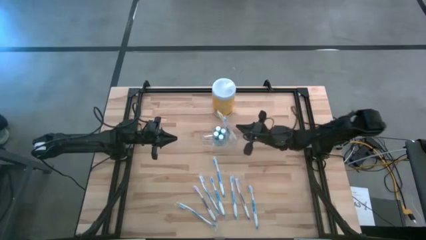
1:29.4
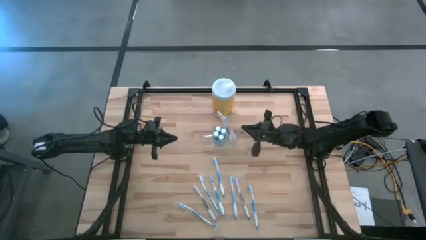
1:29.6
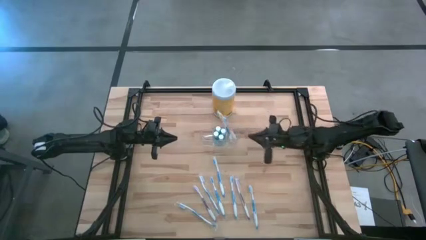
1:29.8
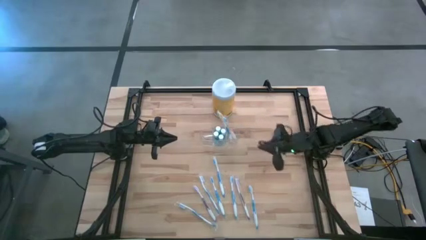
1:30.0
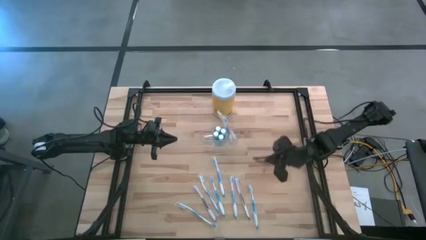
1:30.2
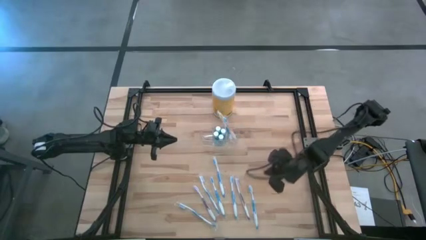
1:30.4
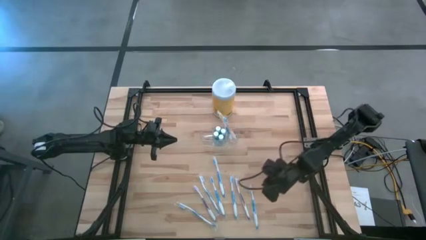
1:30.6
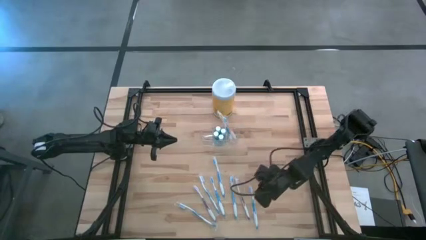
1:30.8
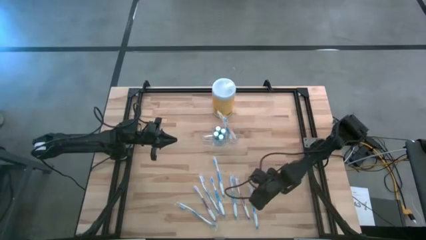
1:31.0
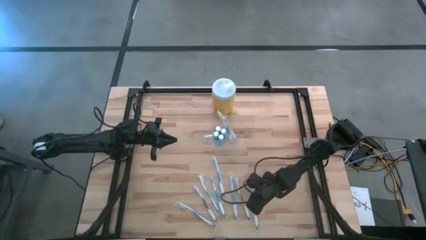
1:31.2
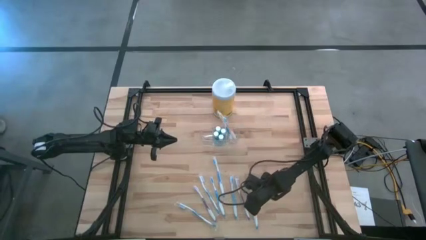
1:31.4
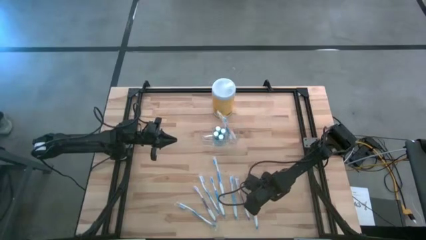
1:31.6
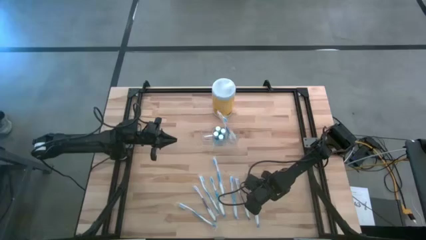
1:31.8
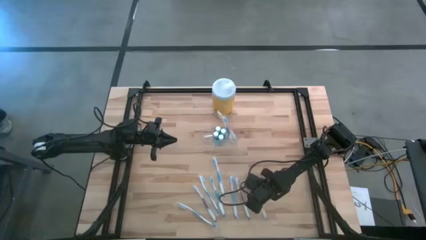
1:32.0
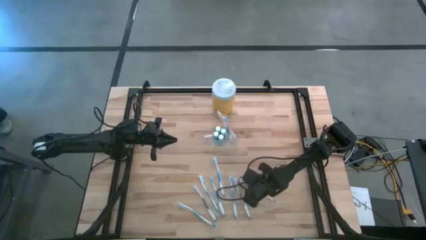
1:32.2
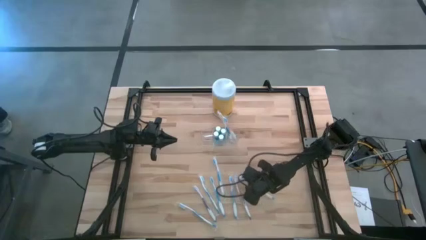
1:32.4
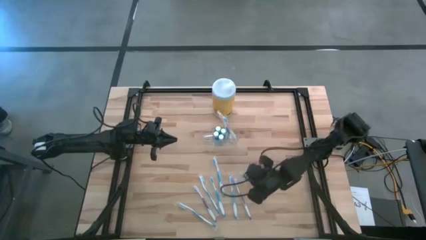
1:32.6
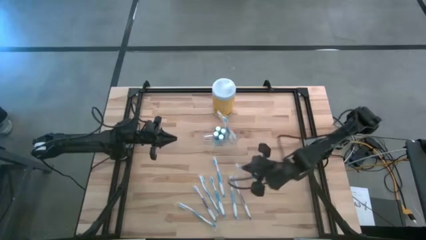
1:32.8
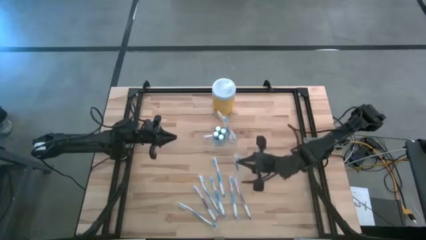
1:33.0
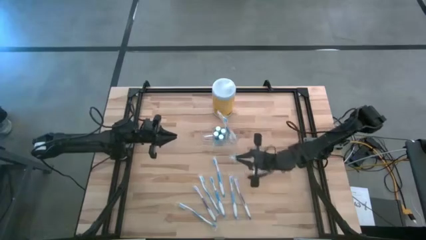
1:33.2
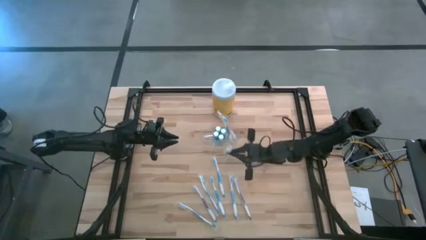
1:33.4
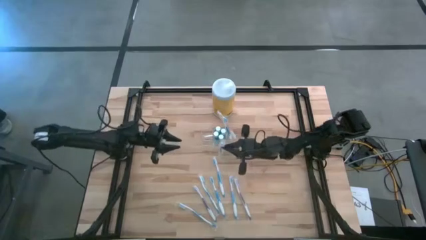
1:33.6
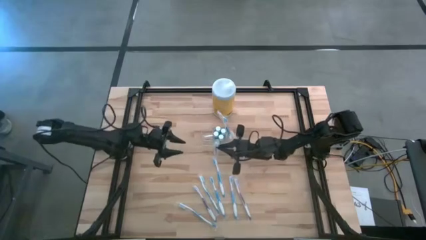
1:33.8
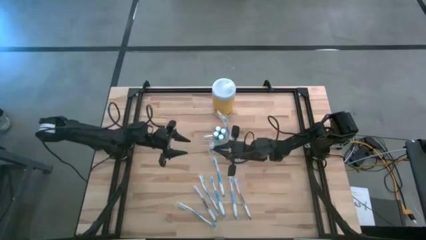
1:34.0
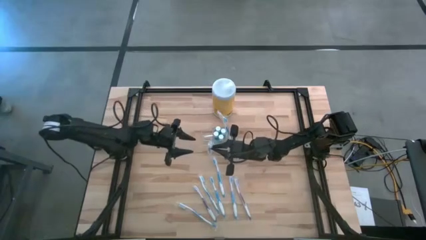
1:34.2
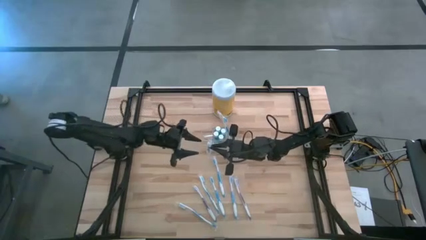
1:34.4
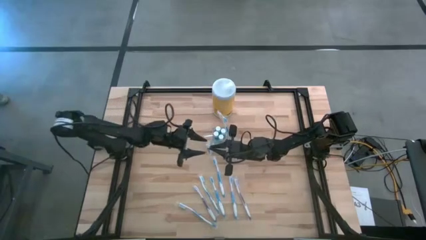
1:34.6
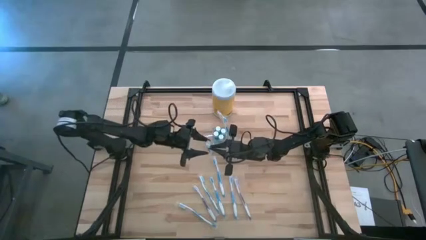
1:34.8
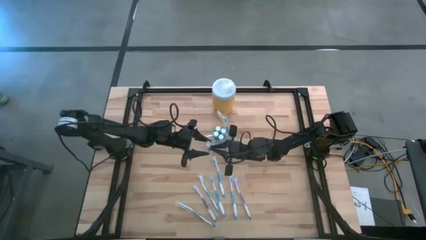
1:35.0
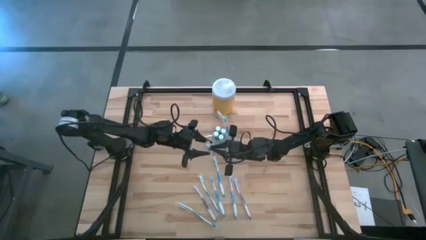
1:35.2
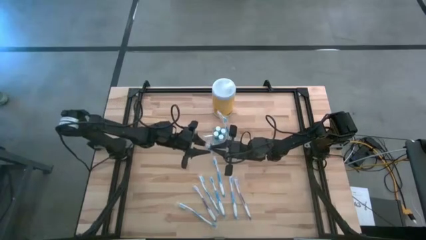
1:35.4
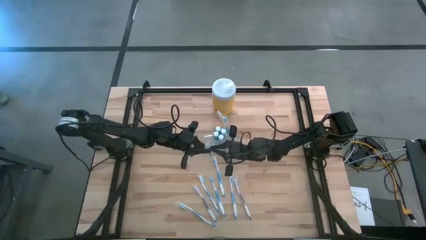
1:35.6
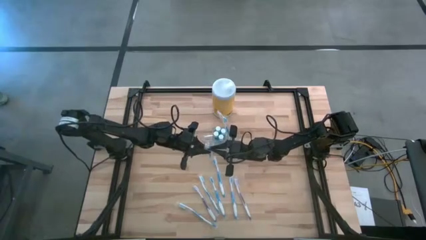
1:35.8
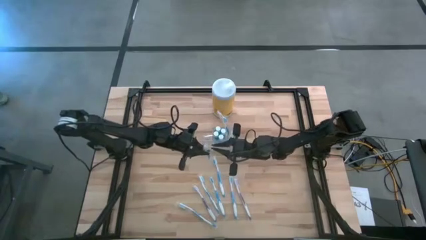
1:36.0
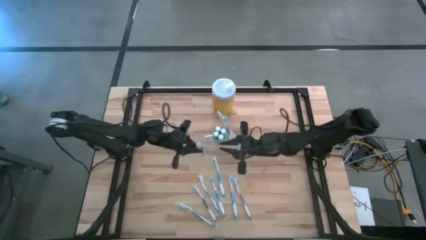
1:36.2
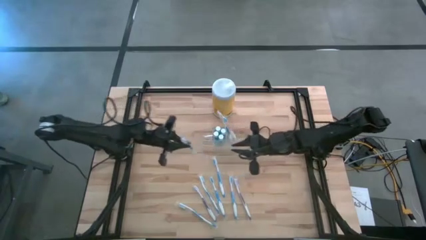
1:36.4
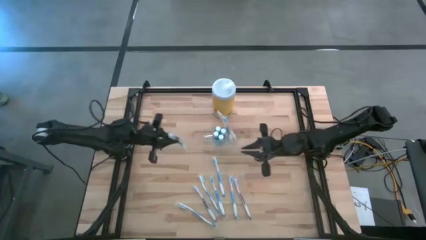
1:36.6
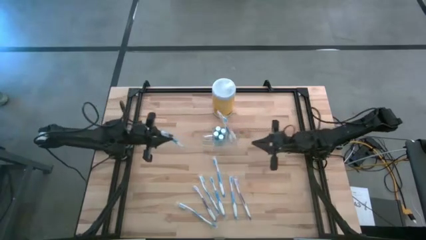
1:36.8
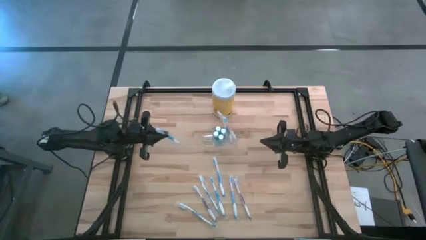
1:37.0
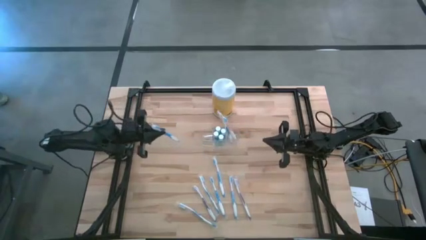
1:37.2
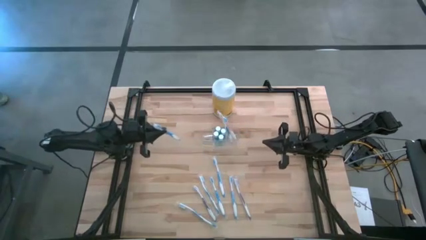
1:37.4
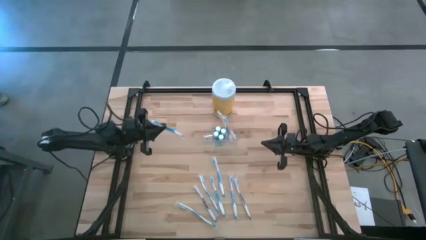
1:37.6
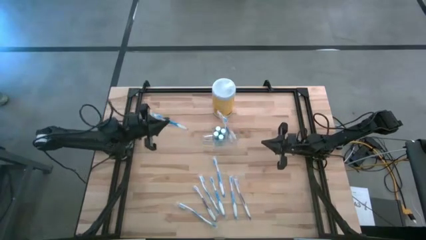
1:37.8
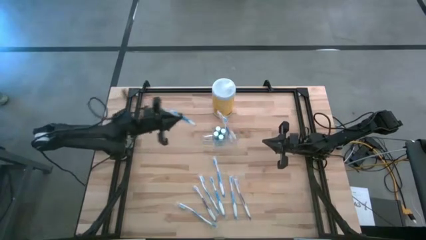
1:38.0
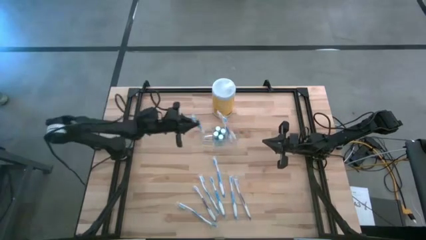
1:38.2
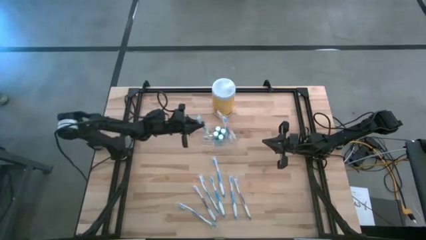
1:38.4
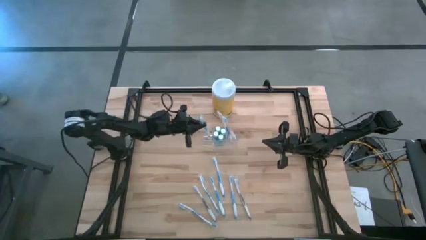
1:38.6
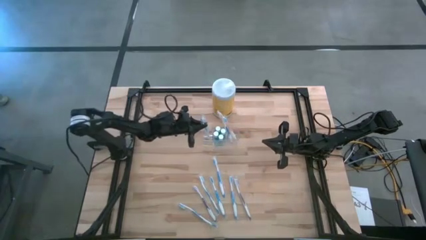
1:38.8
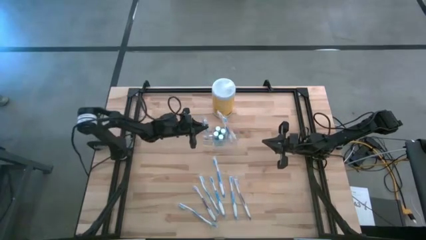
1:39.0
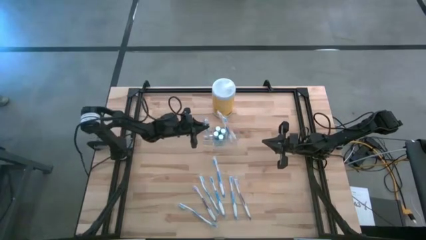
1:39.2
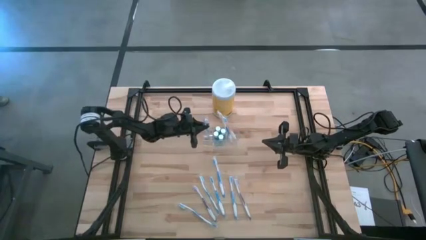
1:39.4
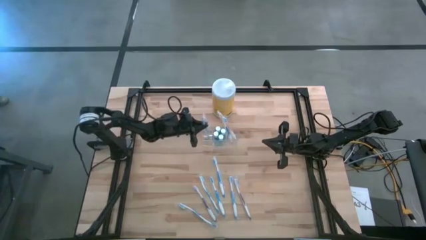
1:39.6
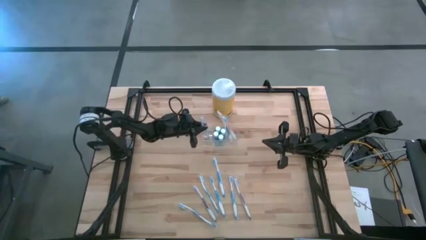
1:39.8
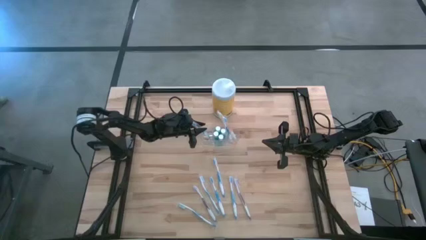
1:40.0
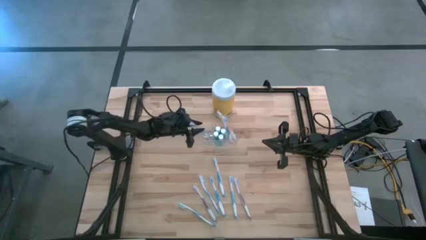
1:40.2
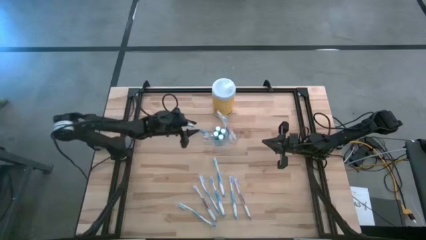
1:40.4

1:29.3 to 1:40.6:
Task: Pick & Place toothbrushing station
Put the blue toothbrush into the transparent organizer

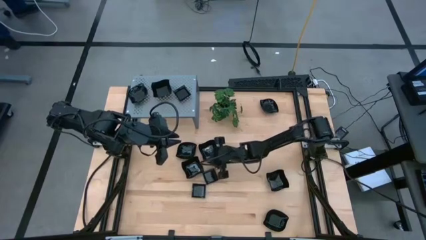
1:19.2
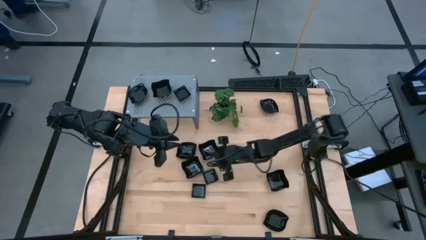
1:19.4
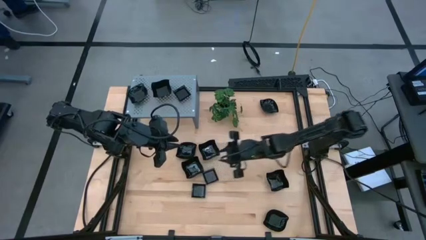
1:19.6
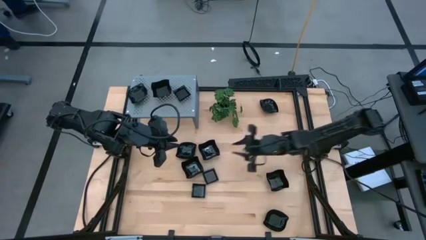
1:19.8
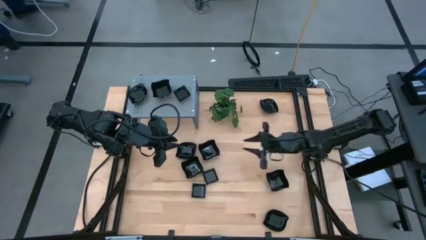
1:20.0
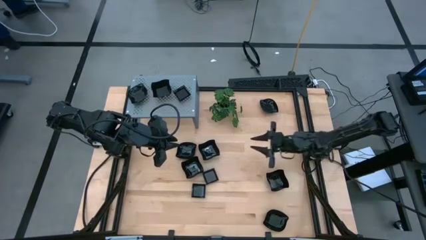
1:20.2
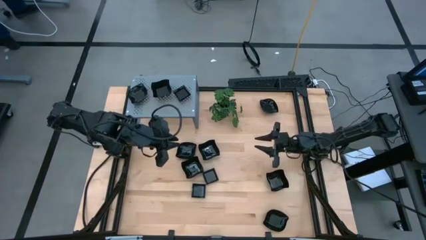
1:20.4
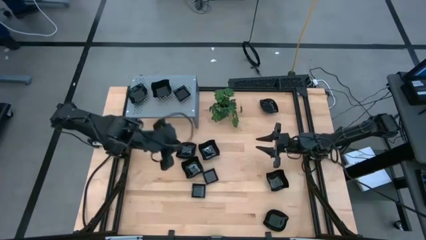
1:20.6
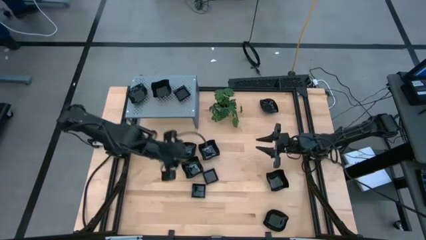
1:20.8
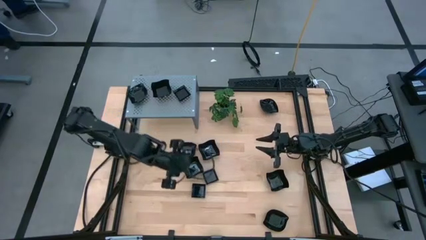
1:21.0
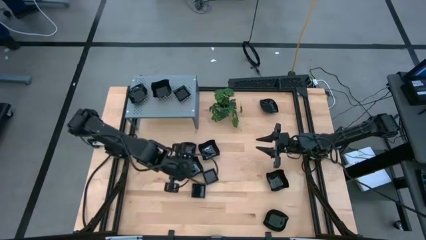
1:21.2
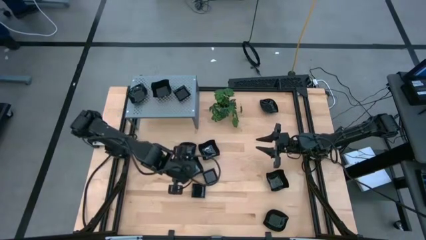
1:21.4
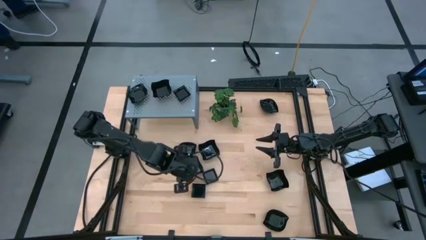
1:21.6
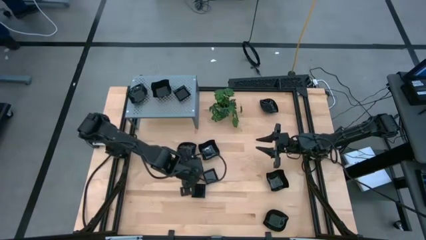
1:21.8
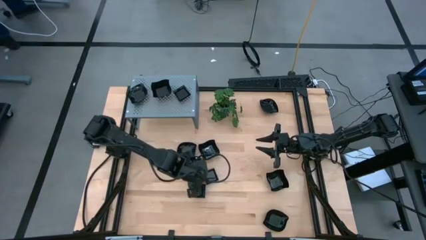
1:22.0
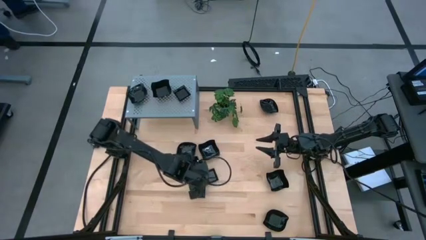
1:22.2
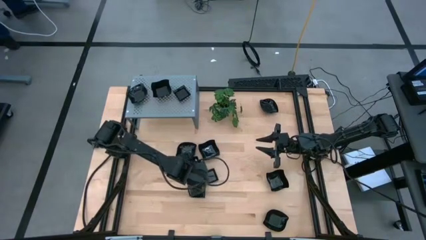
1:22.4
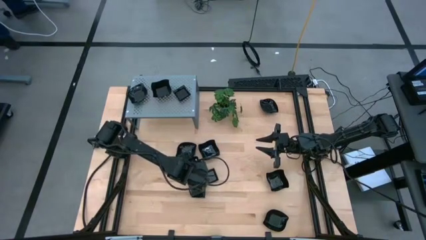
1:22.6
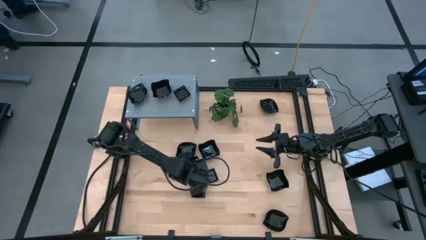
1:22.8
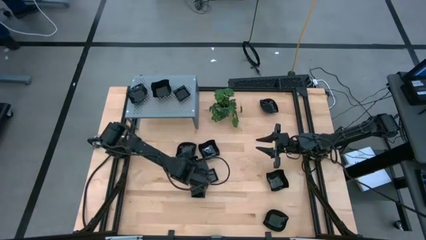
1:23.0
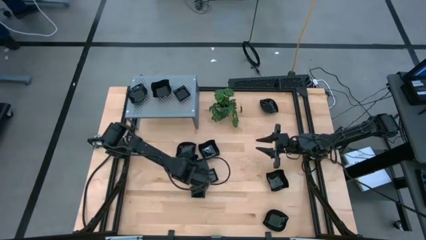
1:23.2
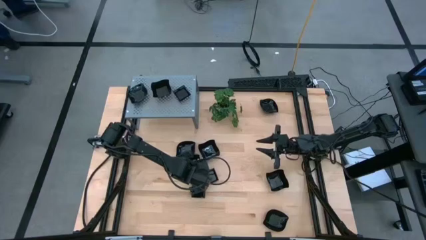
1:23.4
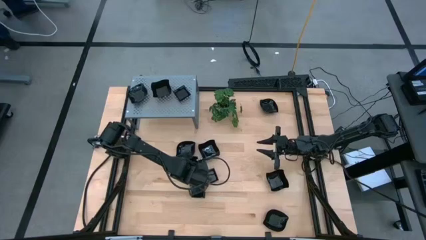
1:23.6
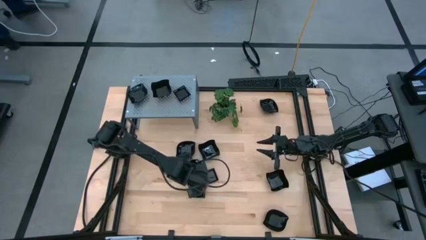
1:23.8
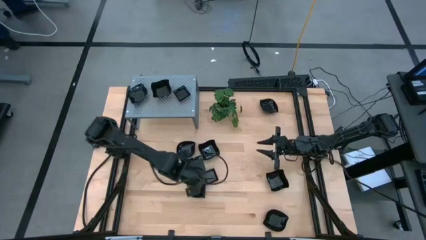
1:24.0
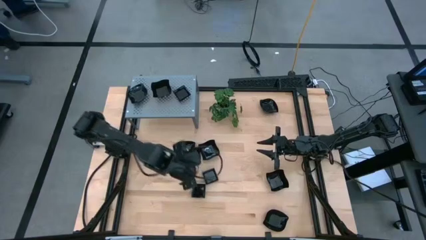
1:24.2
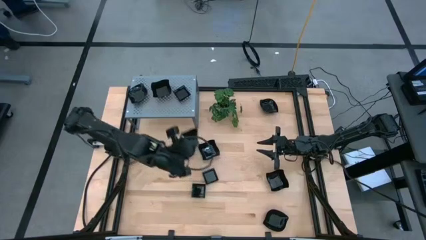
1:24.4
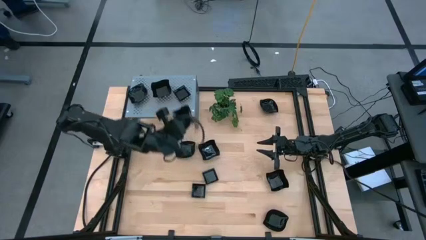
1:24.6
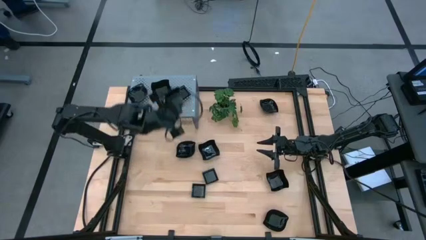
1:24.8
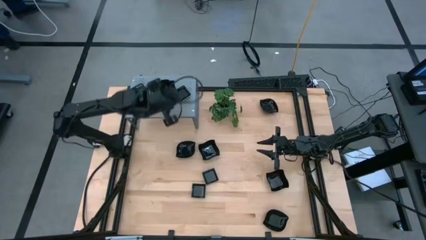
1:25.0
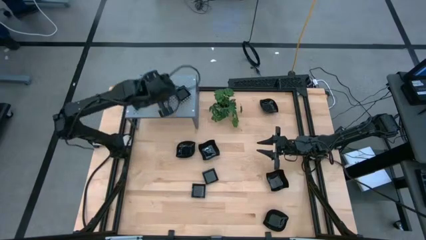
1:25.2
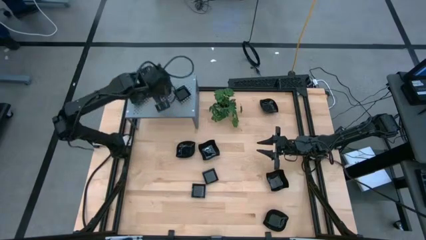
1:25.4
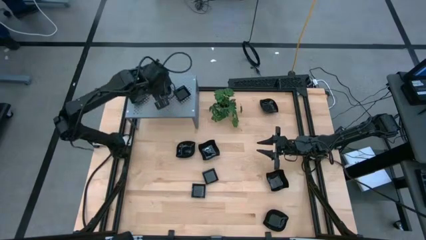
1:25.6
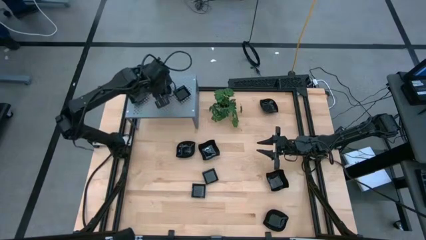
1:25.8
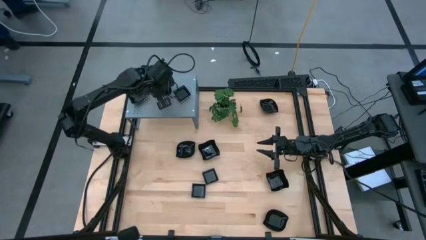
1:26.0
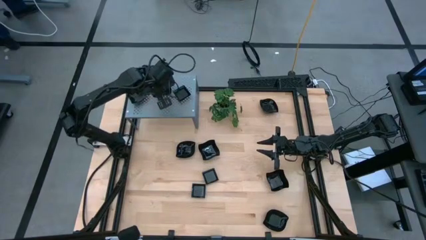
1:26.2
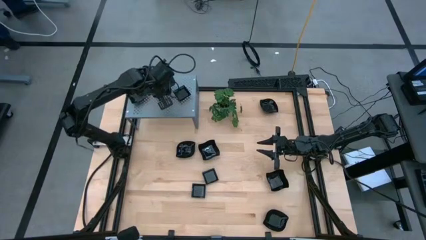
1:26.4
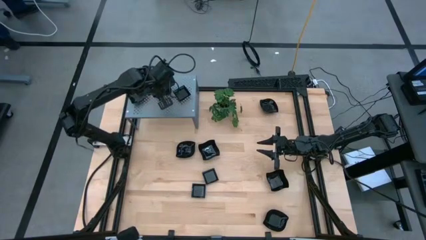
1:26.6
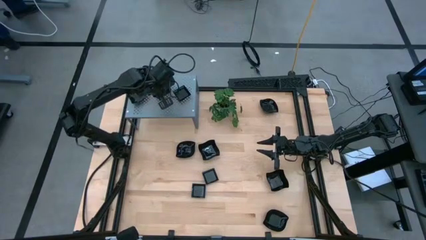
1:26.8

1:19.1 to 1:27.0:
Task: Pick & Place Mini shaped plates
Stack the black square plate on top of the black square plate on the shelf
